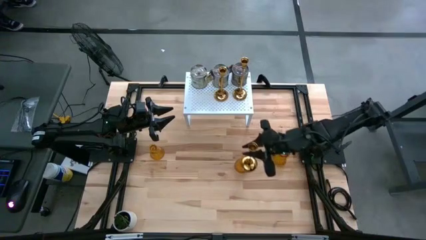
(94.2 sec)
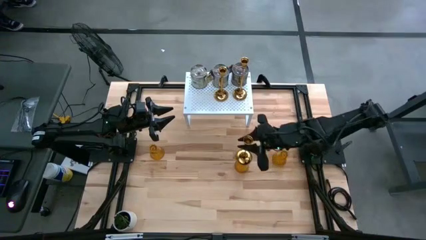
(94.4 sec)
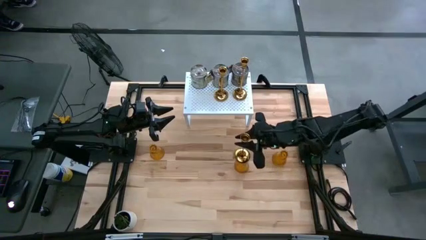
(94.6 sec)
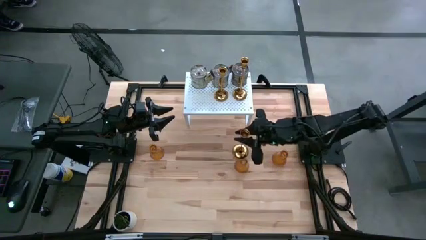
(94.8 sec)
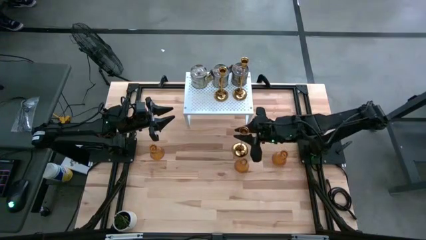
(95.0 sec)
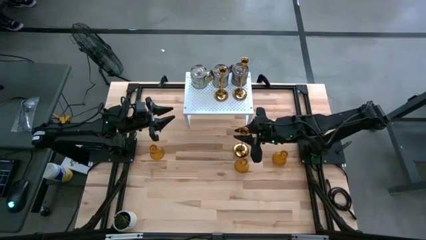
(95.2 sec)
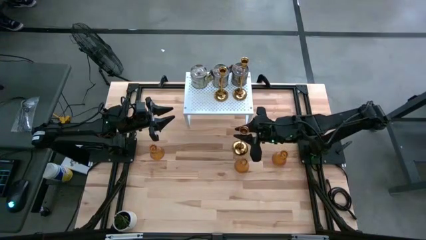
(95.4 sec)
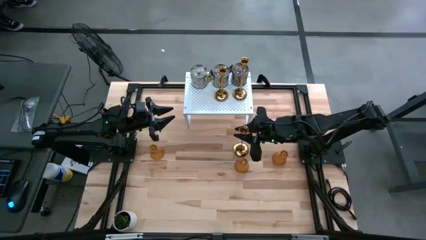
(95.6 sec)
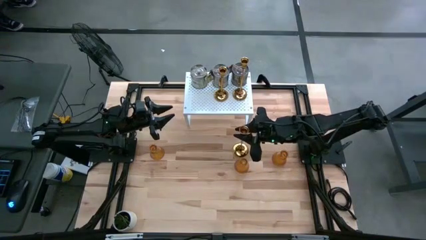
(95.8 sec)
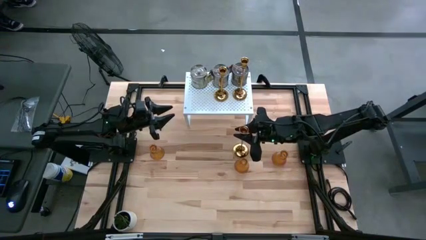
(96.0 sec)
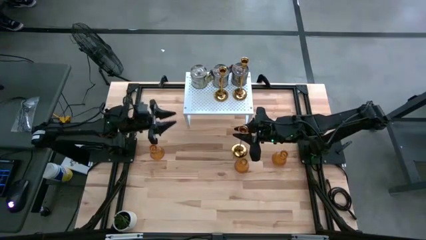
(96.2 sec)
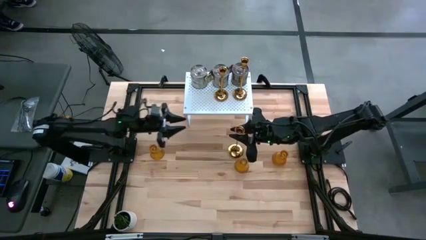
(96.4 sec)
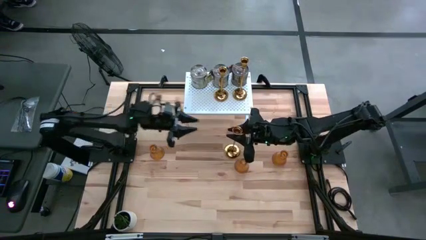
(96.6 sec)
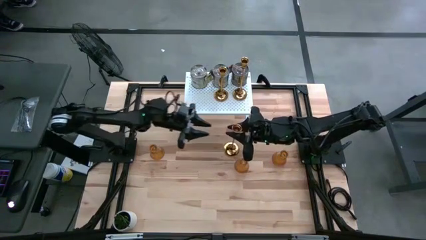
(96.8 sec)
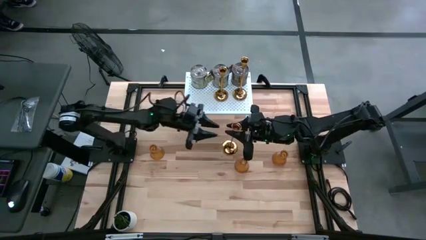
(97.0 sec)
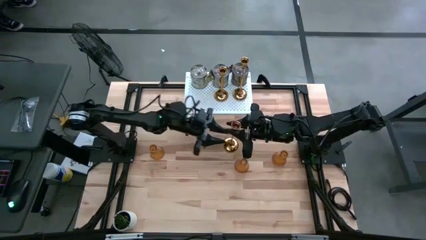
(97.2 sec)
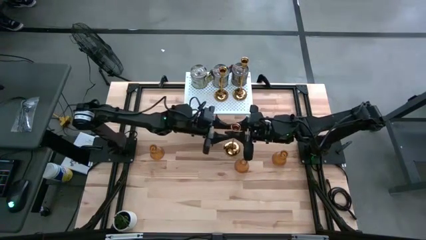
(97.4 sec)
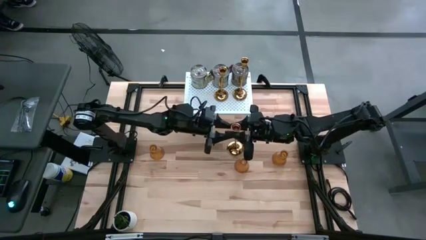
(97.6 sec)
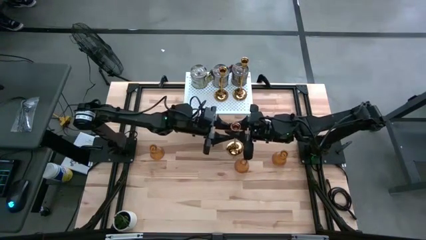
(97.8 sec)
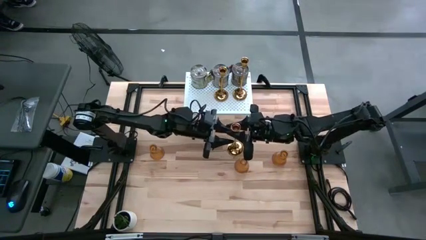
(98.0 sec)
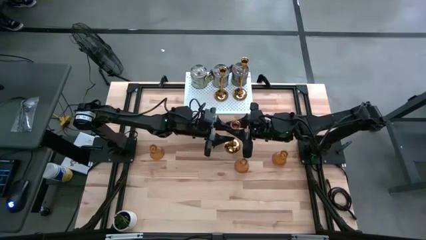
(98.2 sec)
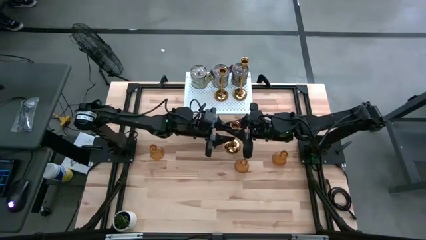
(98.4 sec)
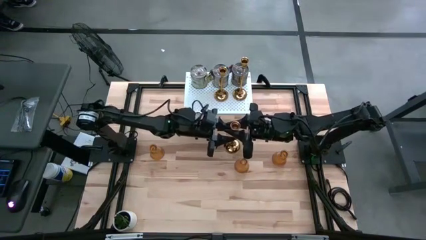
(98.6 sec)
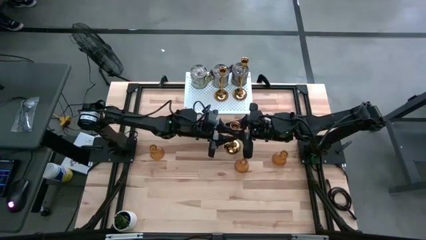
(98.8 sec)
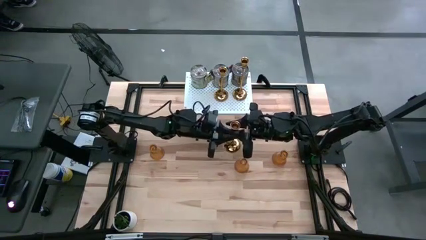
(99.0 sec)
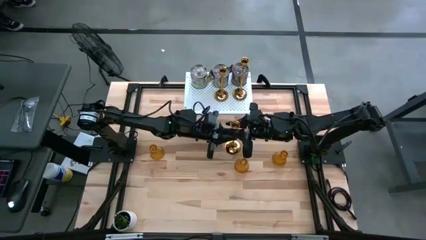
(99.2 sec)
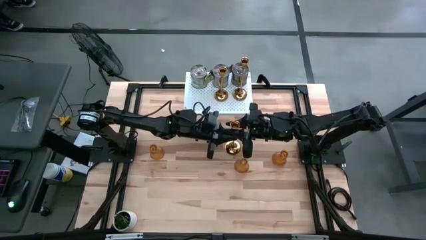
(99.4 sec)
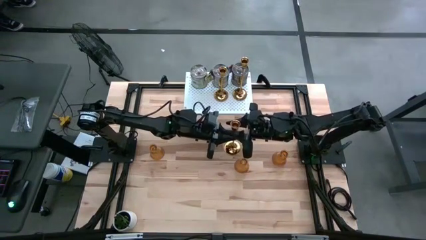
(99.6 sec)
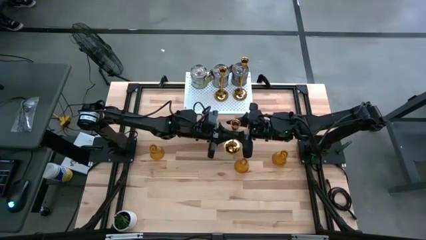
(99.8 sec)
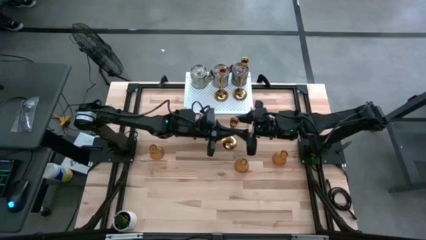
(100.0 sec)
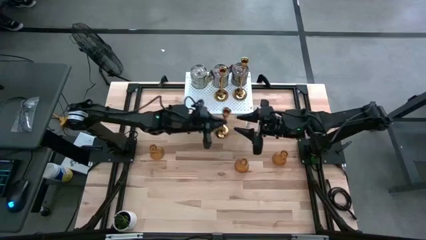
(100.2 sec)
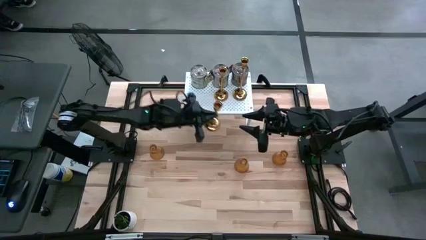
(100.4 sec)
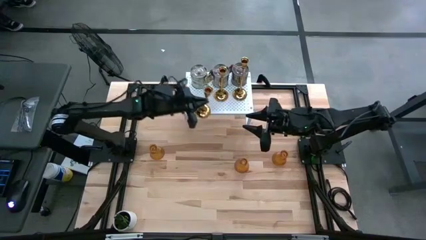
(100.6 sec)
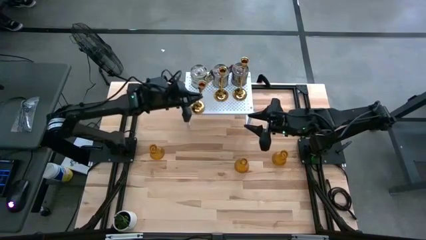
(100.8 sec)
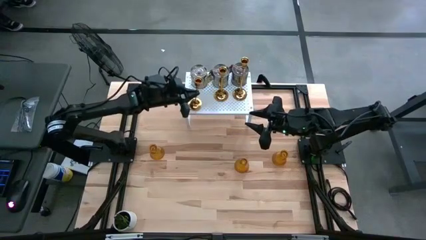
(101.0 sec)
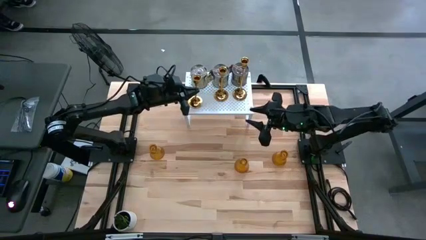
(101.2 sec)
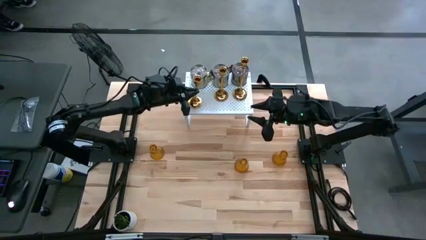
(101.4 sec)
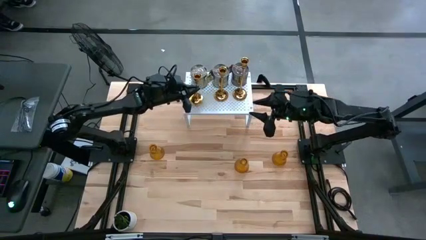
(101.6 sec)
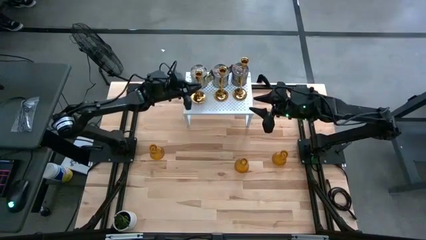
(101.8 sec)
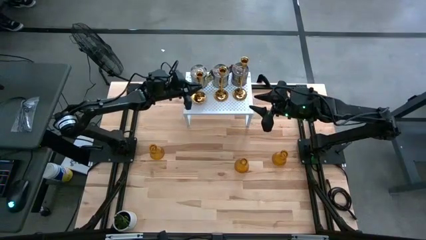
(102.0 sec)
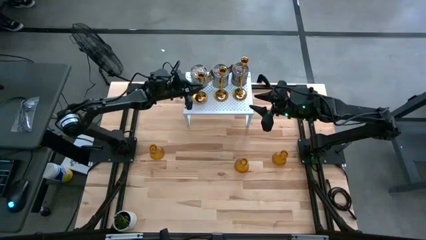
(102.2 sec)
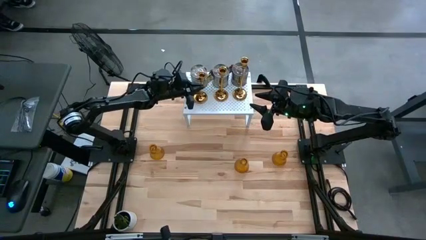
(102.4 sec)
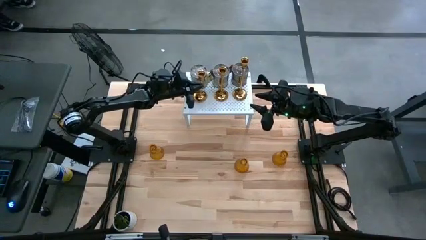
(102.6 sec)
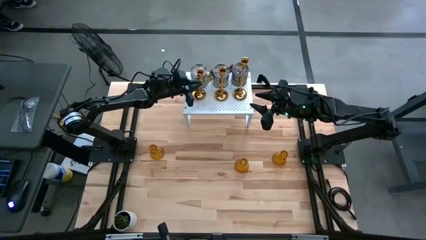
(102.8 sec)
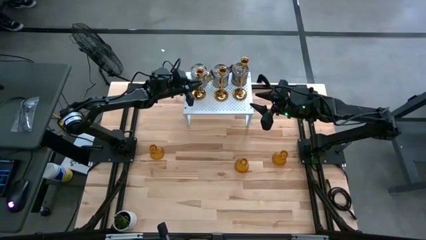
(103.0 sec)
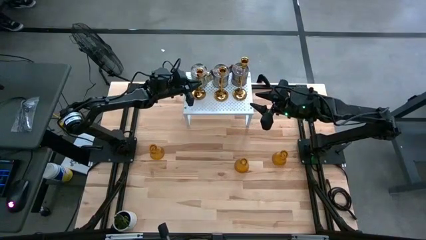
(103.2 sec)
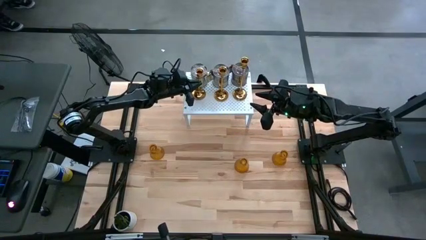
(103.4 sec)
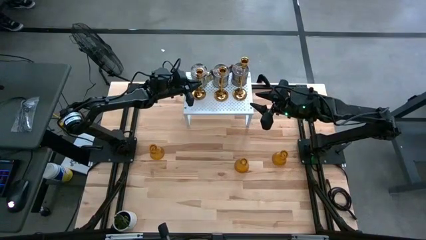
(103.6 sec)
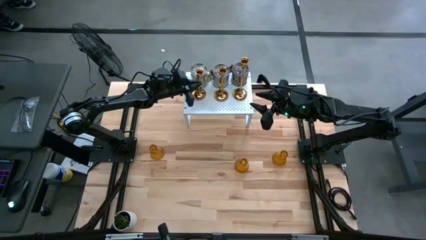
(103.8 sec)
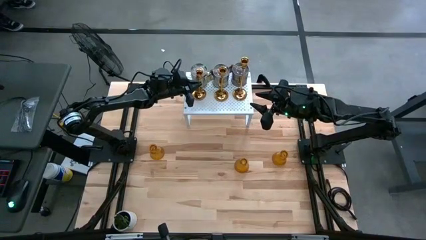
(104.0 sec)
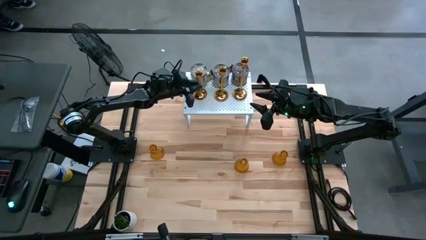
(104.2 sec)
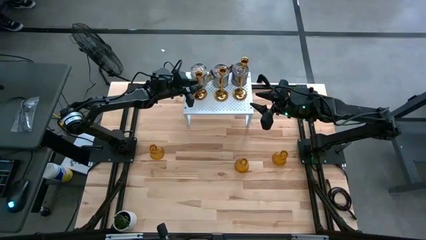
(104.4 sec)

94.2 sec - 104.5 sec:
Task: Pick & Place candle stick holders
Put the gold candle stick holder aligned with the other gold candle stick holders on the shelf

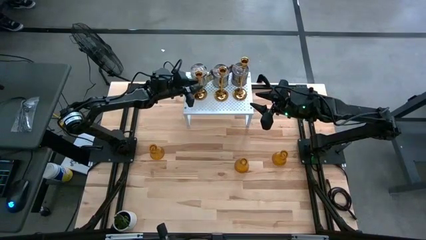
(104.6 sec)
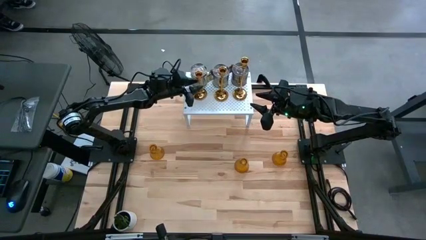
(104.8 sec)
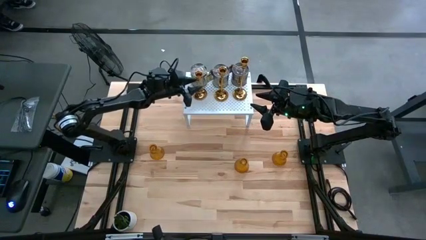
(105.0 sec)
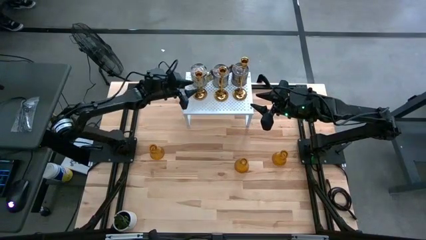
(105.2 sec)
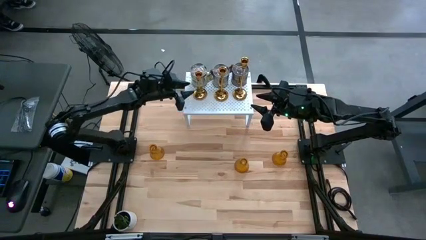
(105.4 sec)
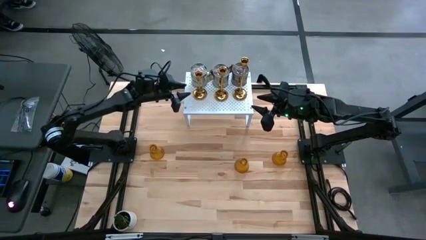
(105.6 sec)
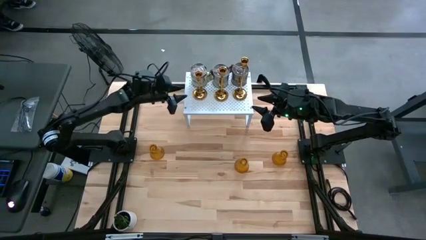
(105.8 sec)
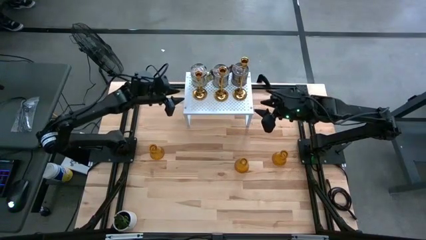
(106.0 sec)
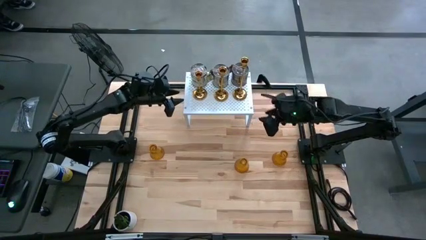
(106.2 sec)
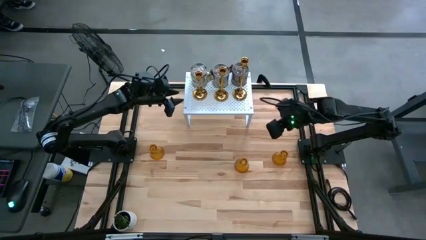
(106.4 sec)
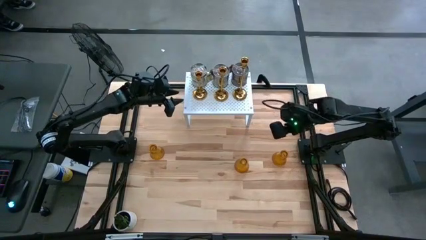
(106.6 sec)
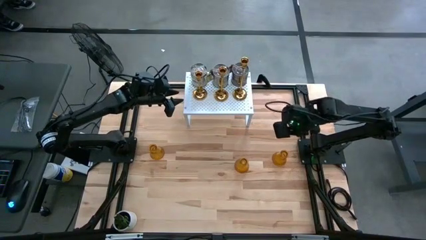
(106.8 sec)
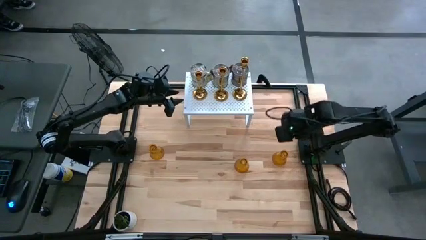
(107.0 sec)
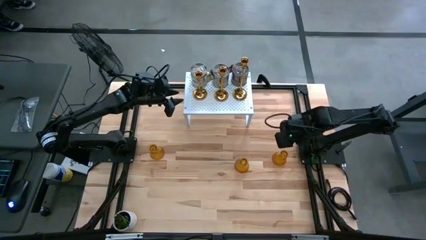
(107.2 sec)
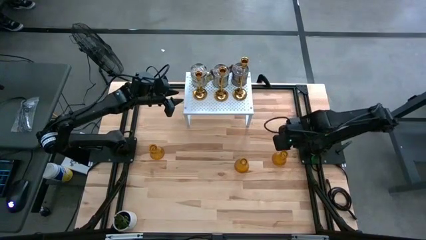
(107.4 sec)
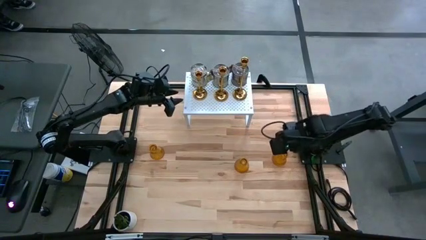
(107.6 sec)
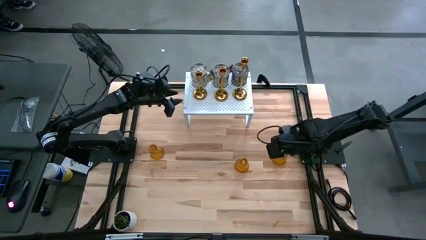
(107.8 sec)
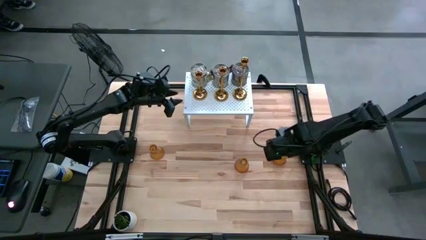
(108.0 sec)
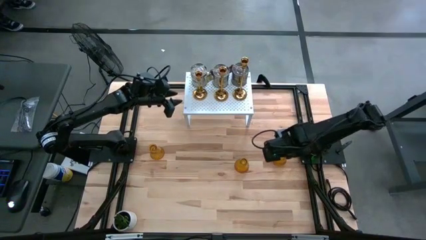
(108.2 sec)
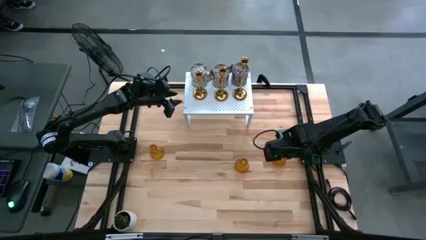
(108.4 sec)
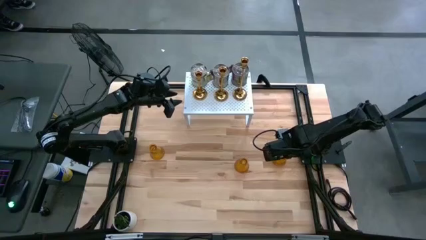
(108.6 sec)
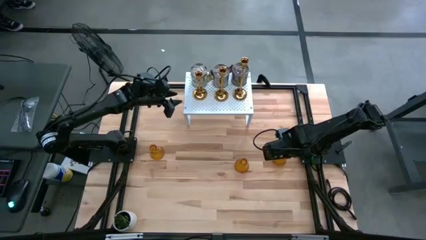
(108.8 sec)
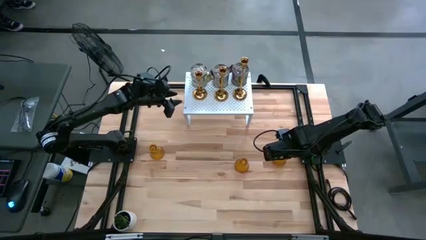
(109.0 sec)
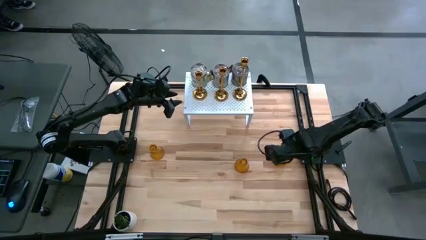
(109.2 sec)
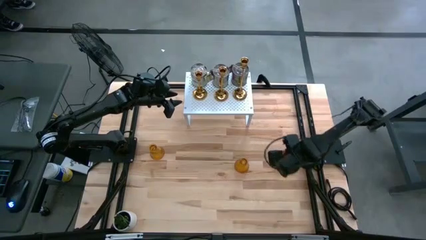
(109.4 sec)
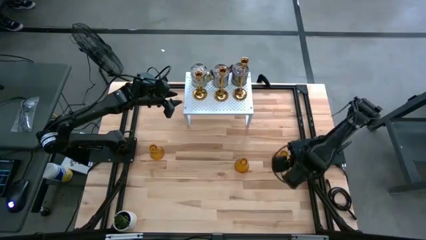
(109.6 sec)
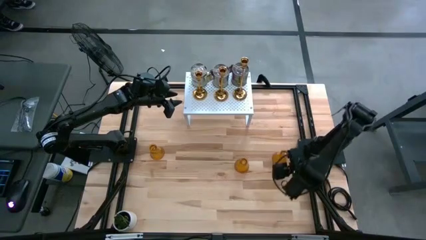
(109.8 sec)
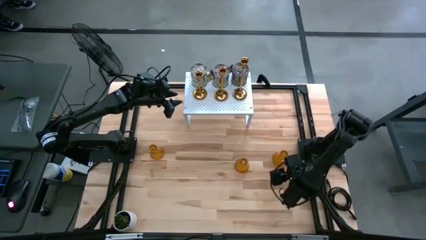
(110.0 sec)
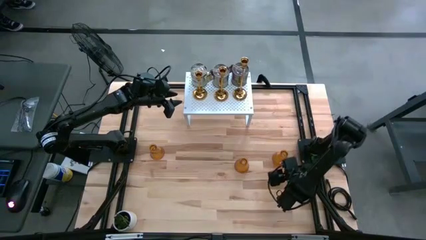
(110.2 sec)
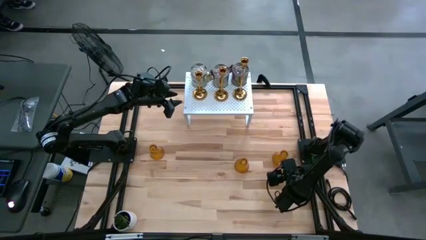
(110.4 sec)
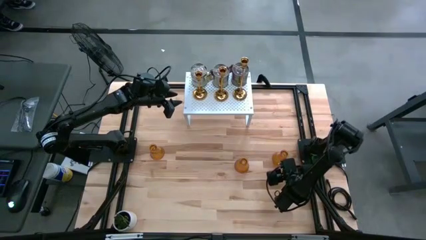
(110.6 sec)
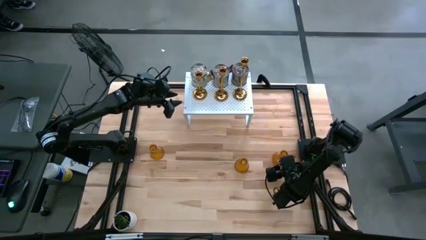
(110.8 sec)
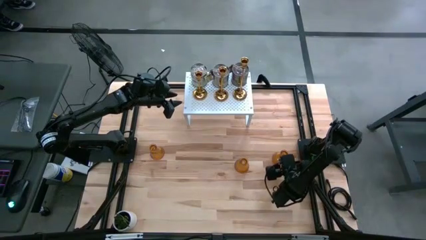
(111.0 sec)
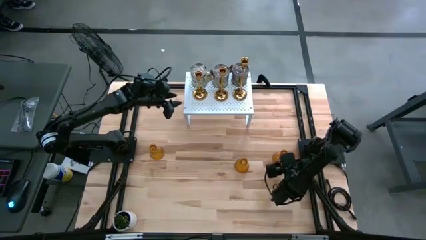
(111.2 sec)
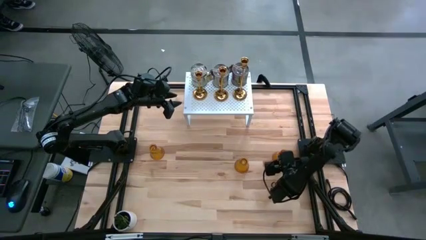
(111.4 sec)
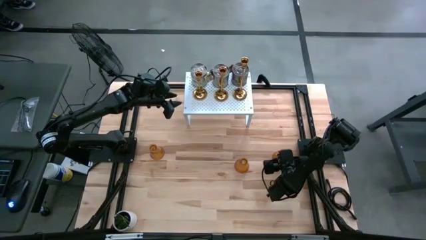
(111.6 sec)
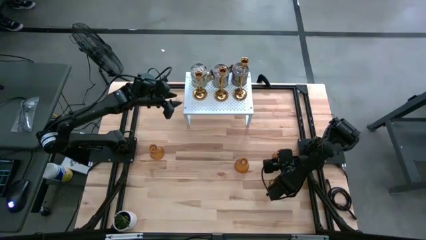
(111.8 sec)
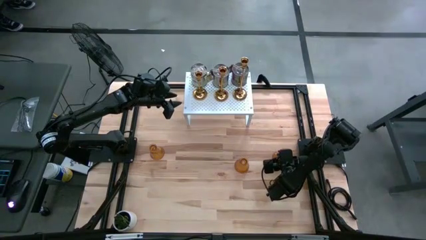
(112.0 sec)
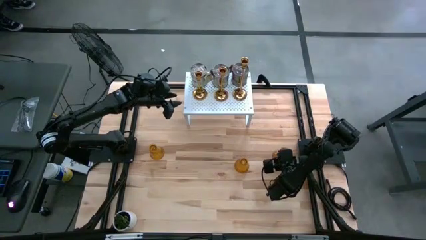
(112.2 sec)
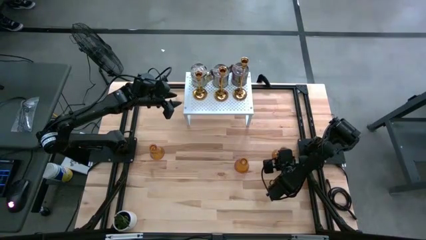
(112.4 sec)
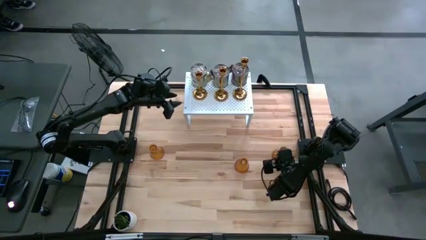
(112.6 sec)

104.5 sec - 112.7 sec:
Put the right yellow candle holder on the shelf
